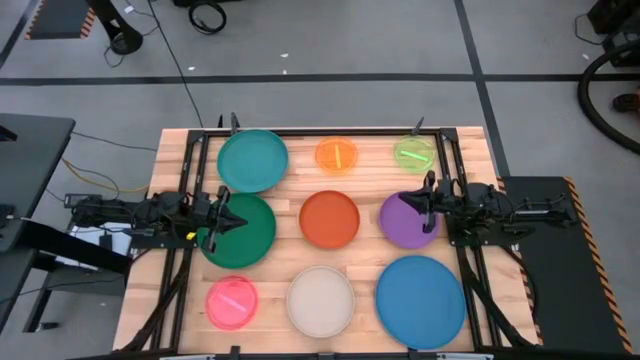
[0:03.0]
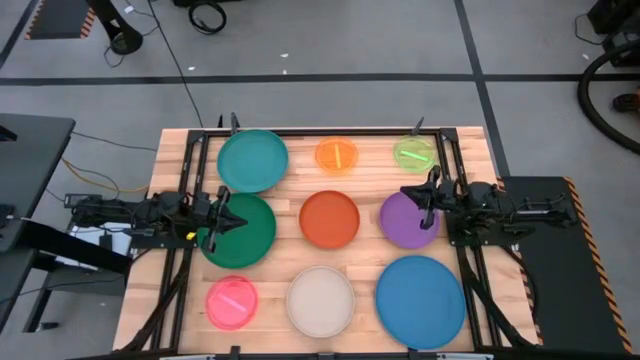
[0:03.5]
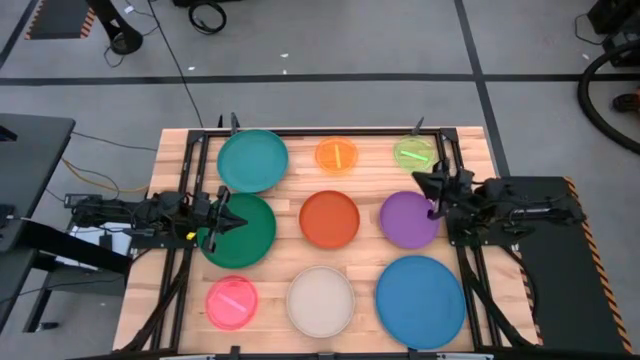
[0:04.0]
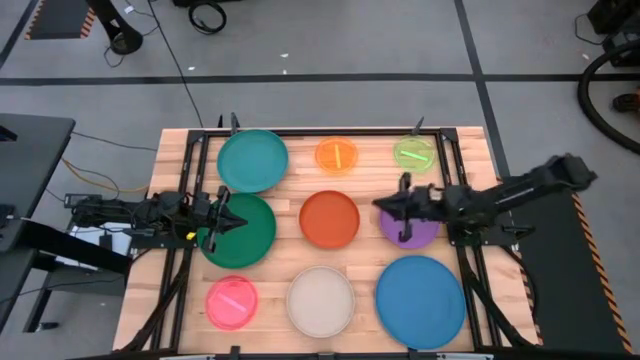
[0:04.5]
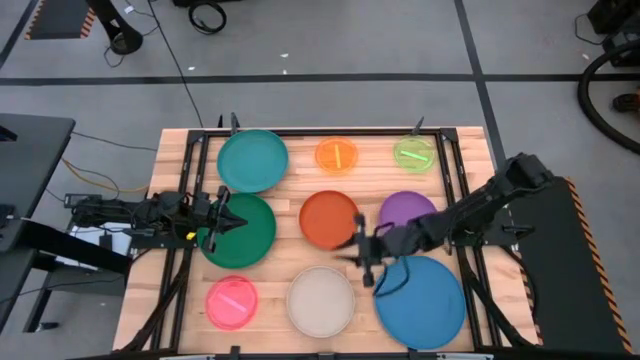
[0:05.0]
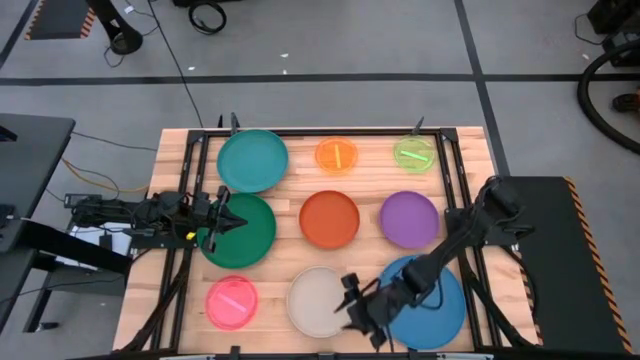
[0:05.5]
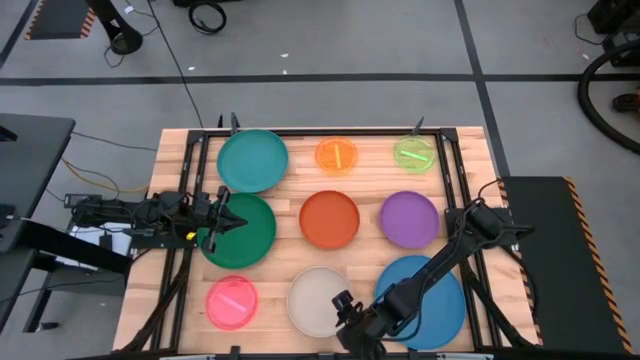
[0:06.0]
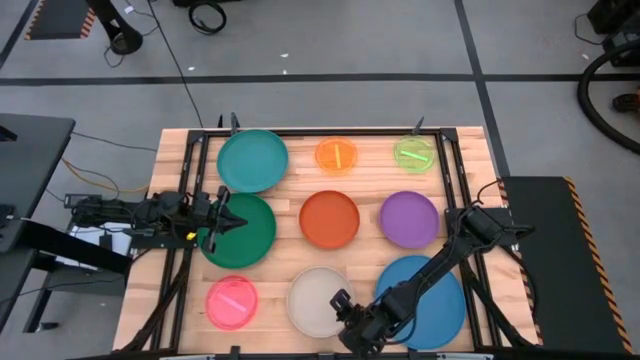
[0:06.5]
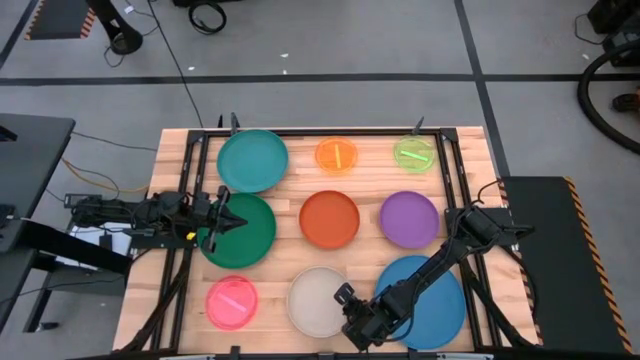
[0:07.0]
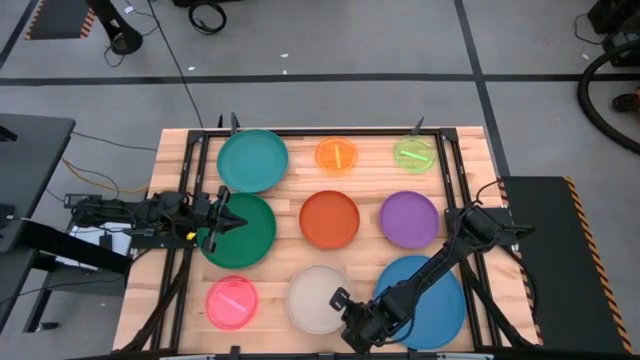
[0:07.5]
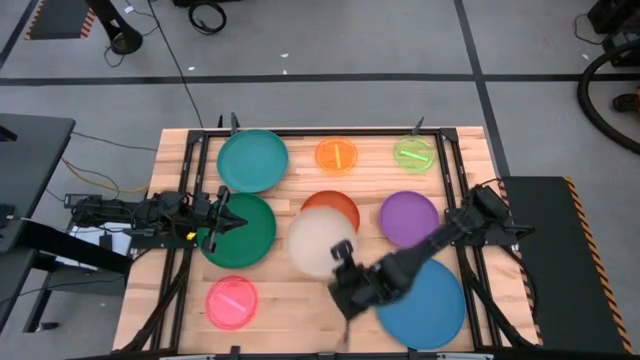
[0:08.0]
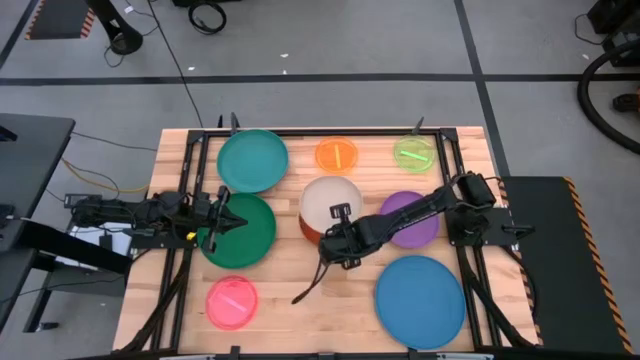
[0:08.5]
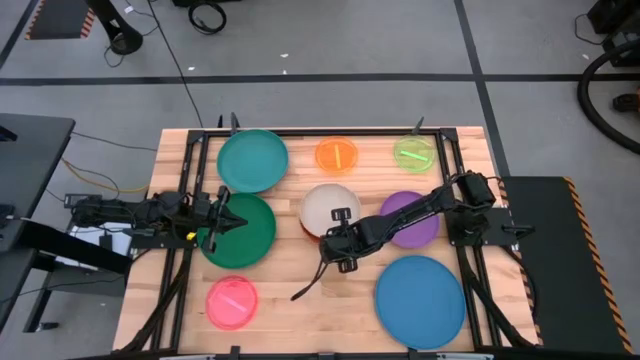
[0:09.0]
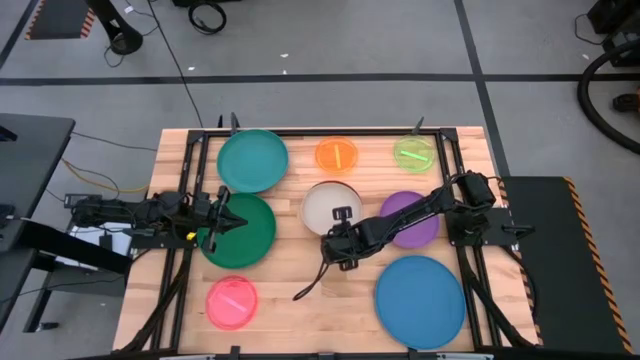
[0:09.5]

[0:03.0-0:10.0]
Task: Stack plastic plates
Stack the light brown plate on top of the orange plate

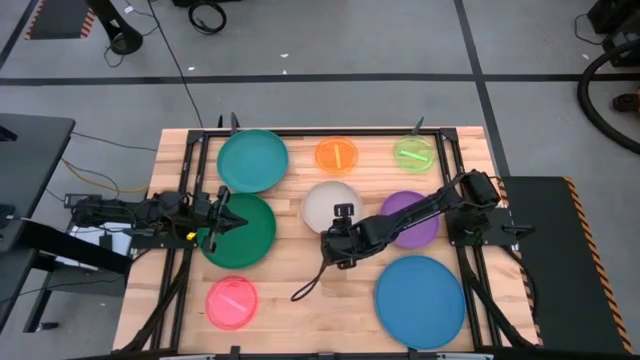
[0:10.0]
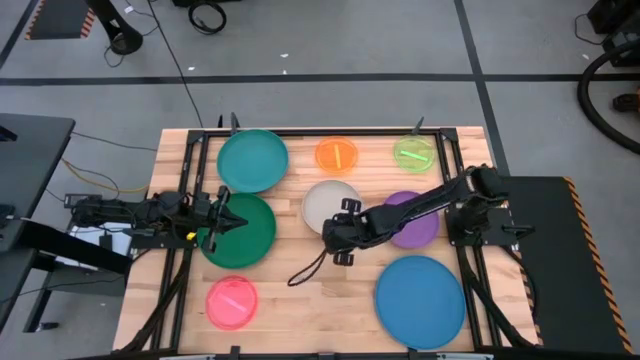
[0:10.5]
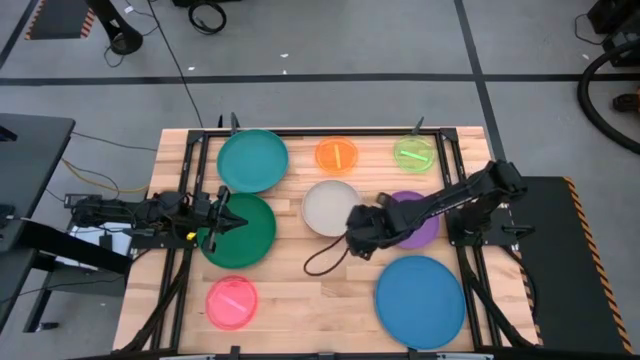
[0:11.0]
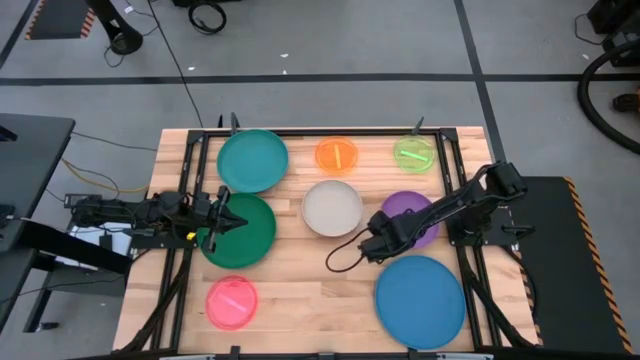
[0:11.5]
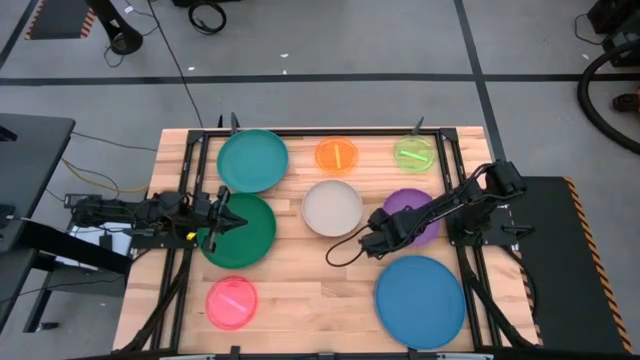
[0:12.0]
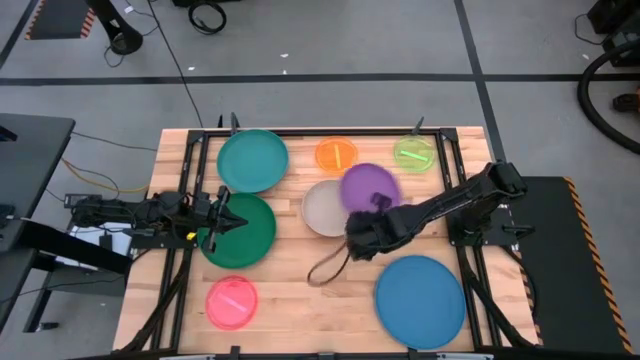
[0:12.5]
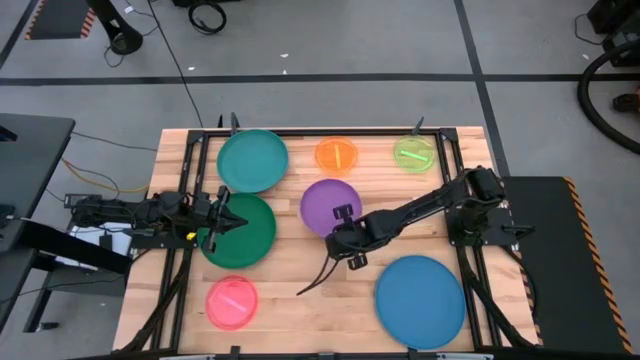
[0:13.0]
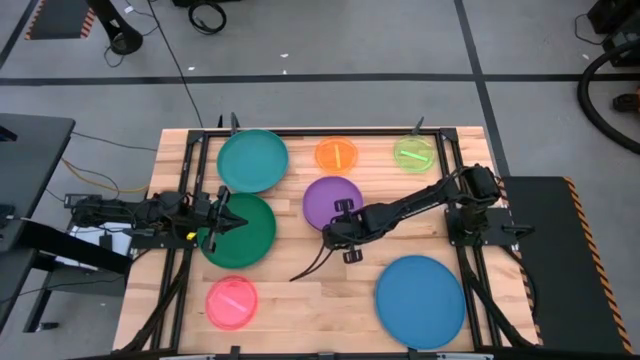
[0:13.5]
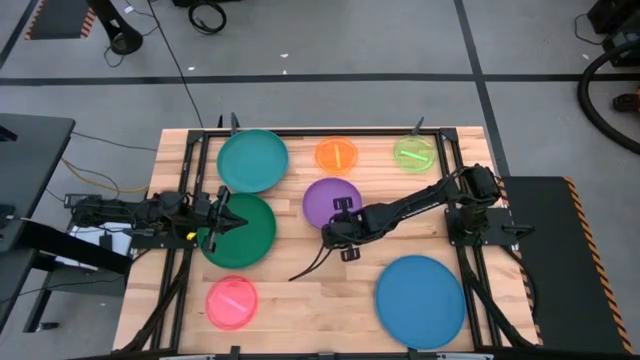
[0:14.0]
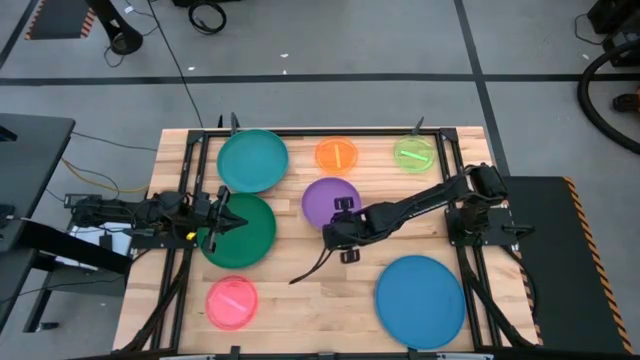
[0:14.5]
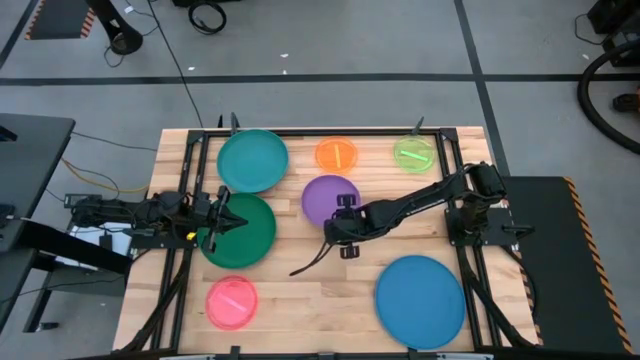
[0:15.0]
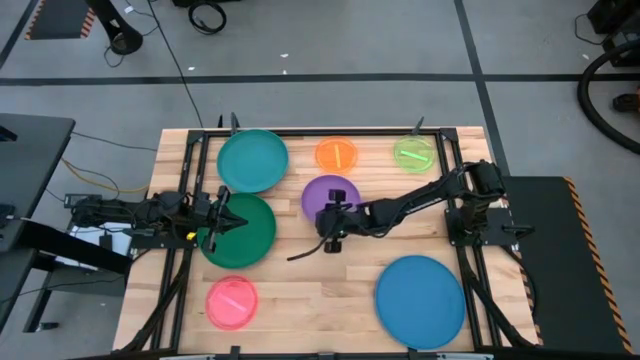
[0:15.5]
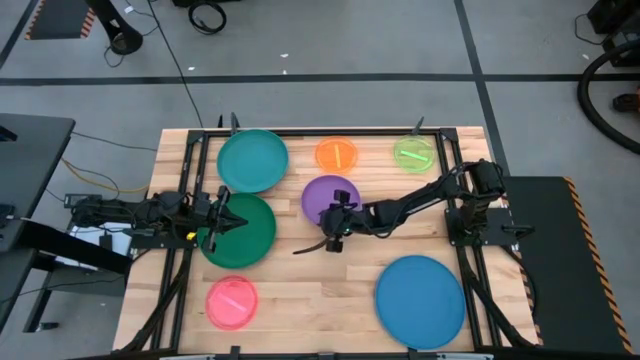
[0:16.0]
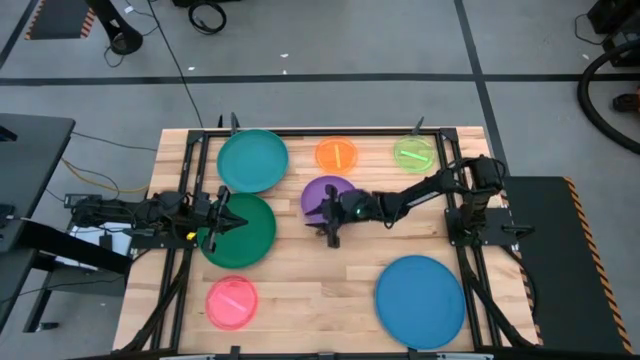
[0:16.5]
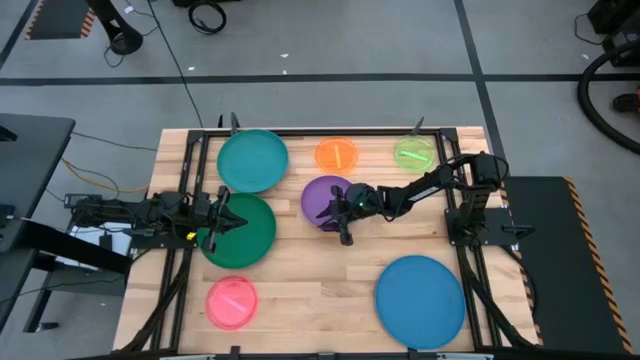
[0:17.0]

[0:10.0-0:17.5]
Stack the purple plate on top of the light brown plate

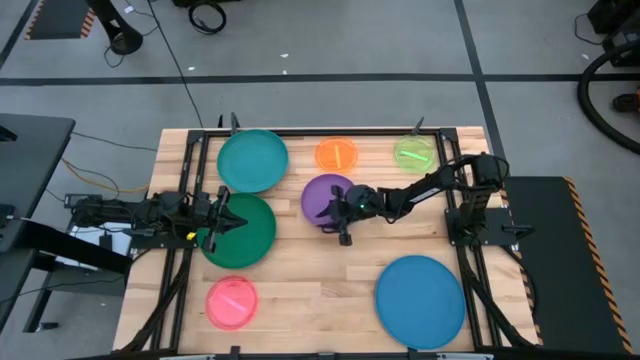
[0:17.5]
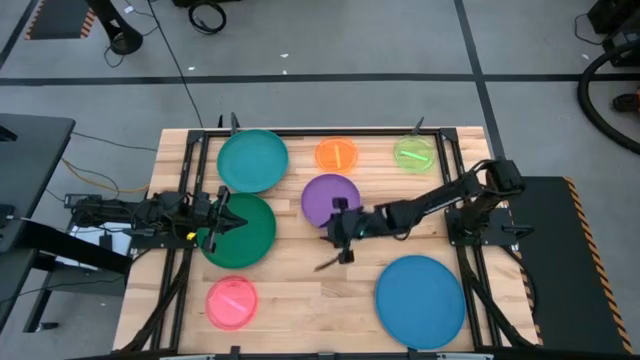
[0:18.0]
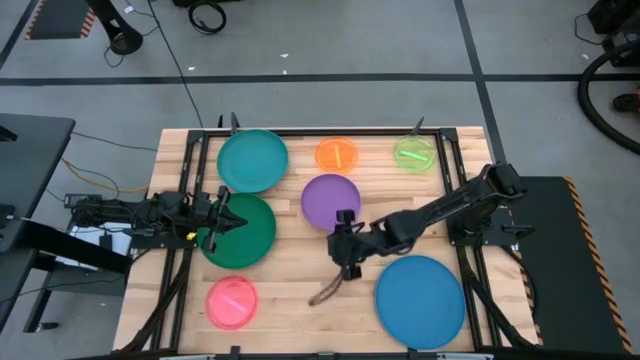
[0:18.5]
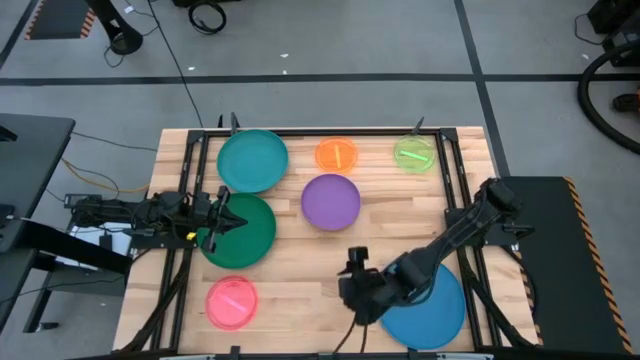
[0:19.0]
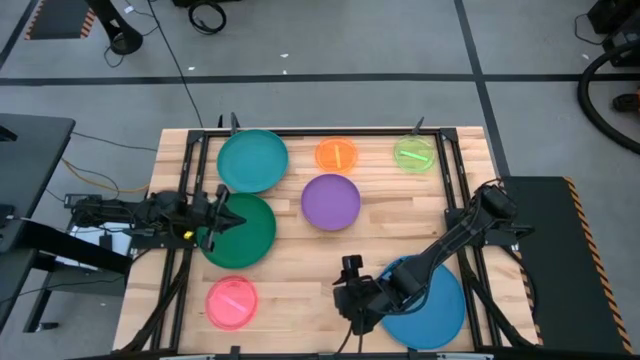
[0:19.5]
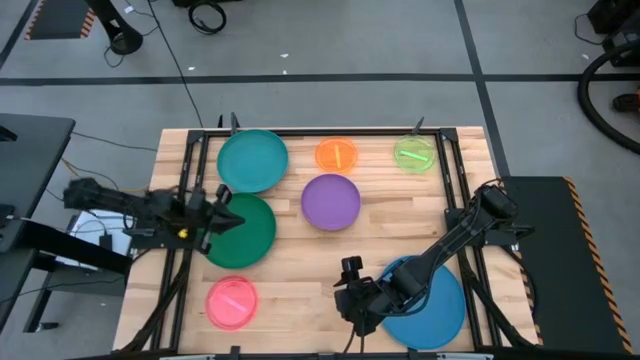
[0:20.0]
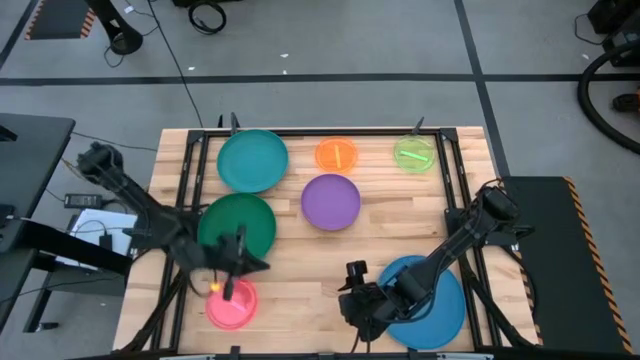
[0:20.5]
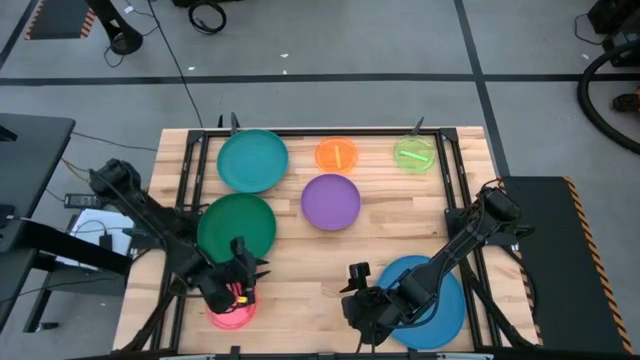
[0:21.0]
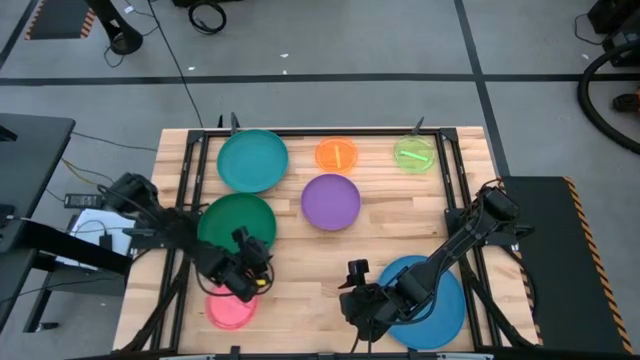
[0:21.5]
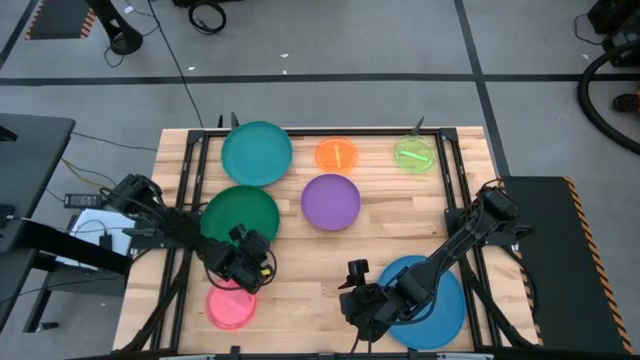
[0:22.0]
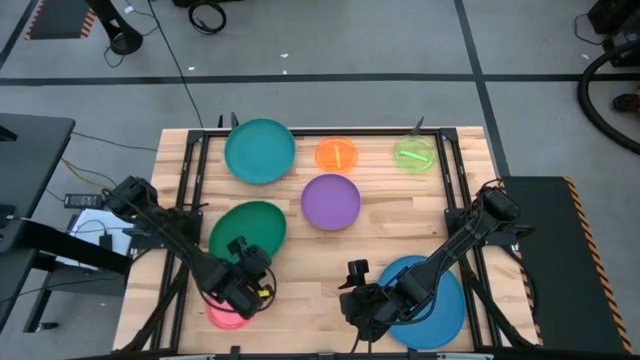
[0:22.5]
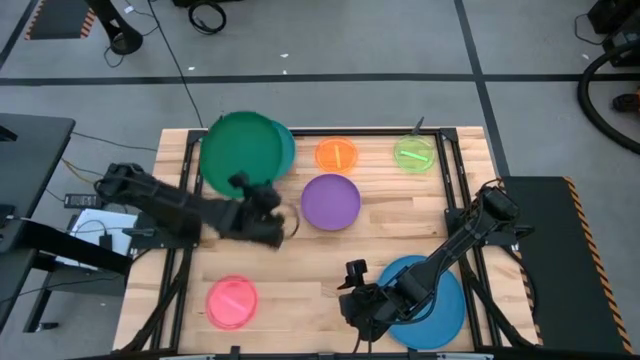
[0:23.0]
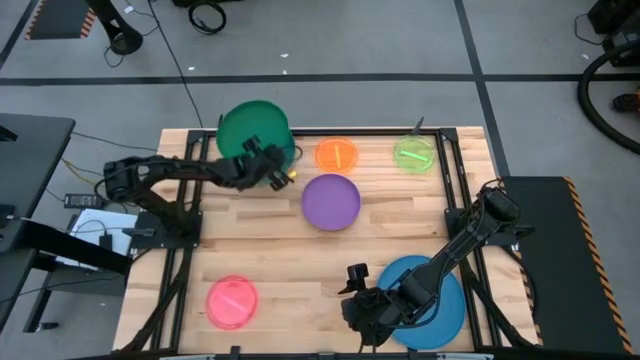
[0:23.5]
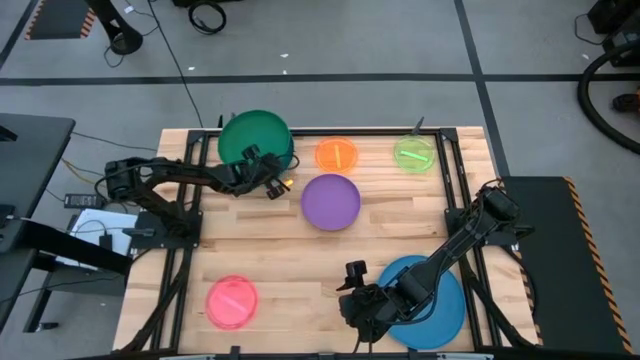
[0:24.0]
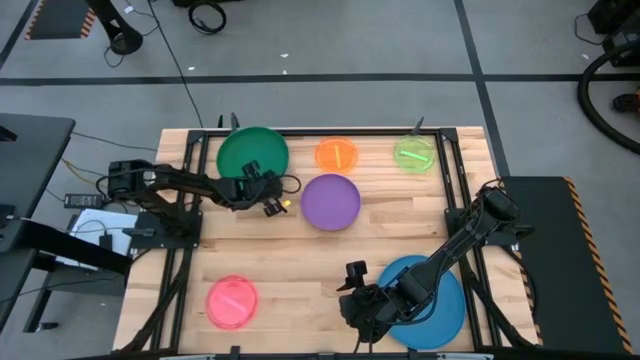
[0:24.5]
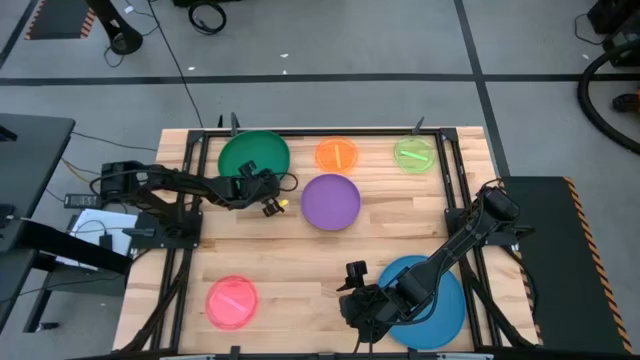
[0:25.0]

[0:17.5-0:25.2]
Stack the green plate on top of the light blue plate
